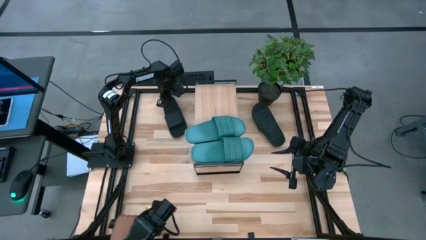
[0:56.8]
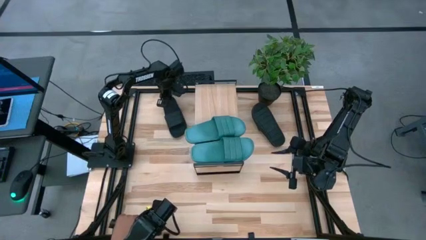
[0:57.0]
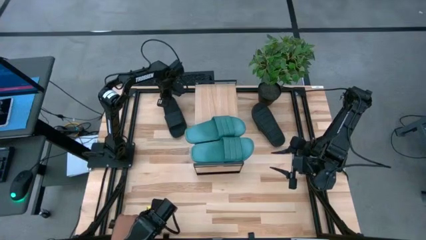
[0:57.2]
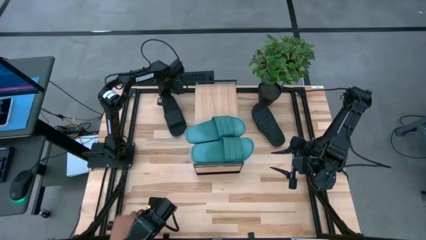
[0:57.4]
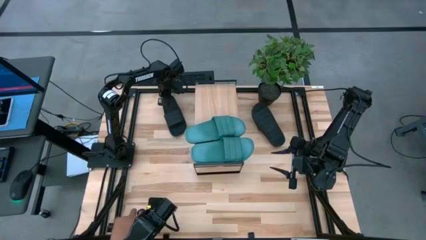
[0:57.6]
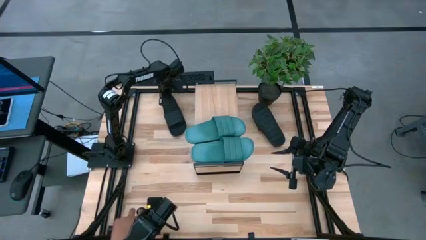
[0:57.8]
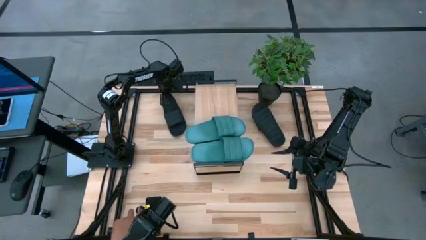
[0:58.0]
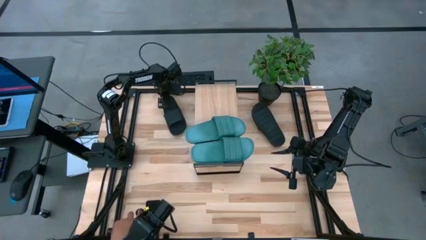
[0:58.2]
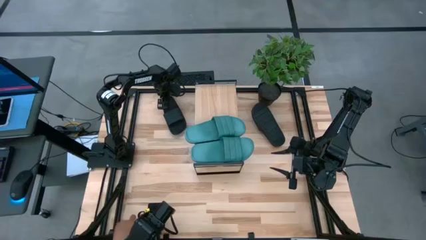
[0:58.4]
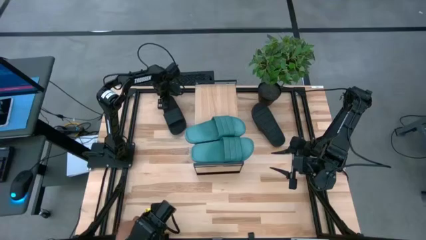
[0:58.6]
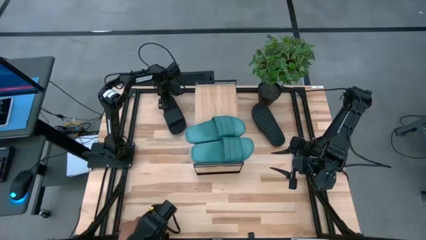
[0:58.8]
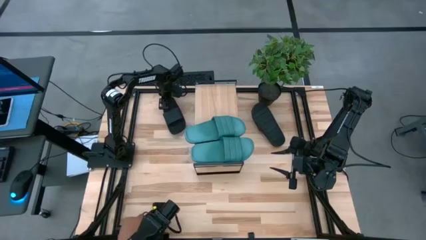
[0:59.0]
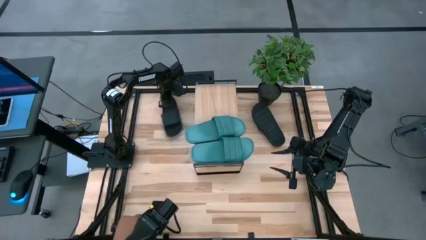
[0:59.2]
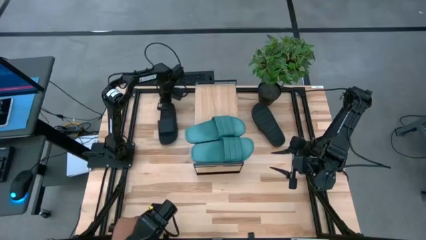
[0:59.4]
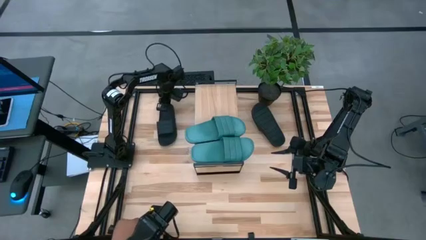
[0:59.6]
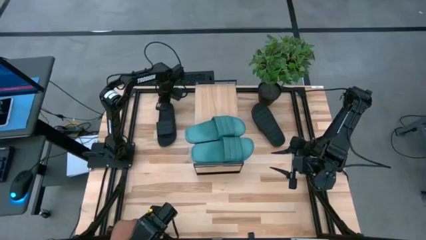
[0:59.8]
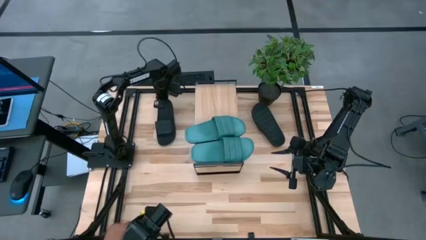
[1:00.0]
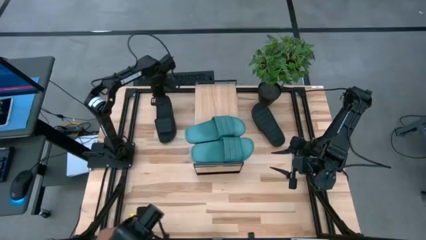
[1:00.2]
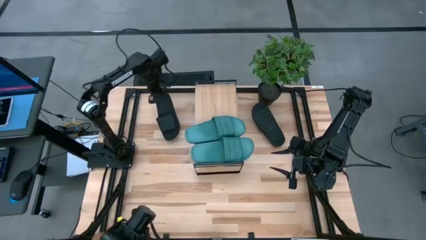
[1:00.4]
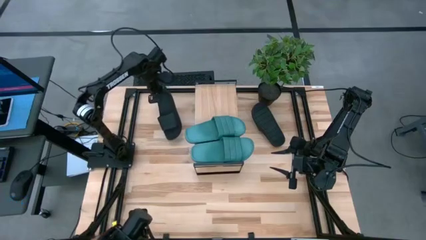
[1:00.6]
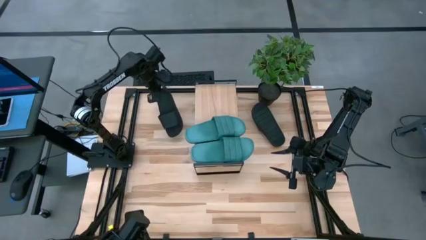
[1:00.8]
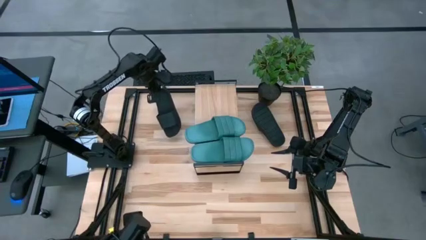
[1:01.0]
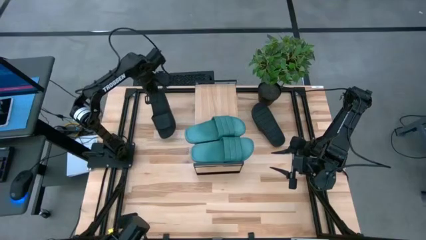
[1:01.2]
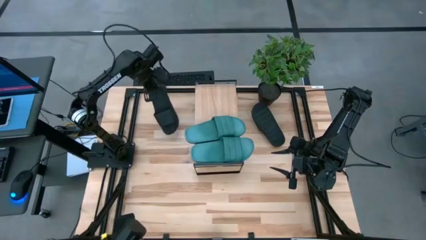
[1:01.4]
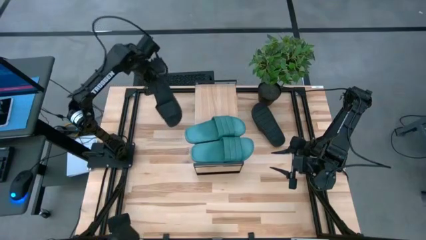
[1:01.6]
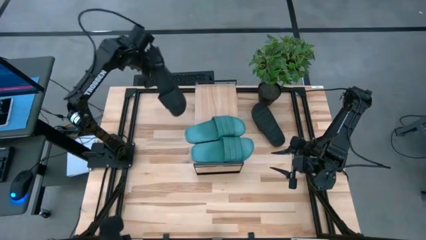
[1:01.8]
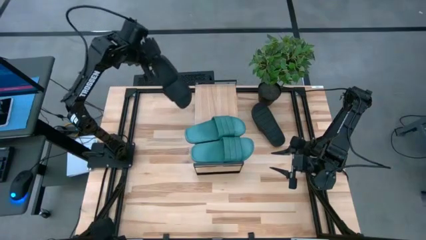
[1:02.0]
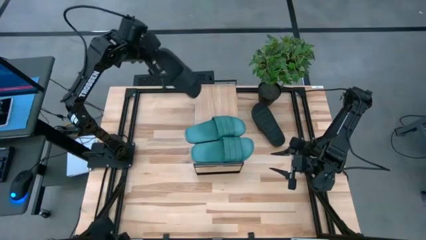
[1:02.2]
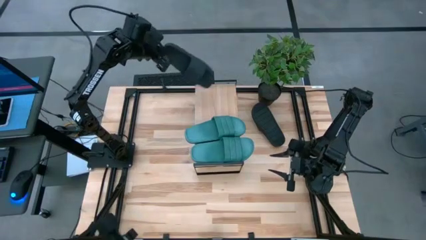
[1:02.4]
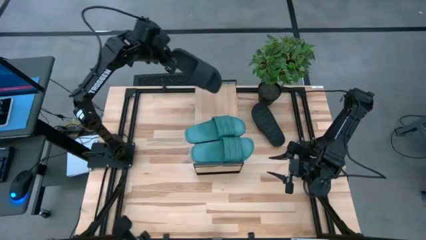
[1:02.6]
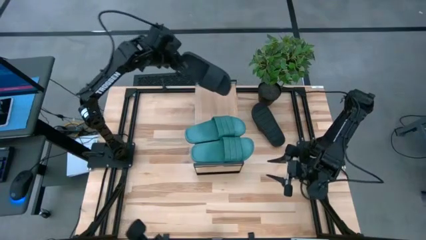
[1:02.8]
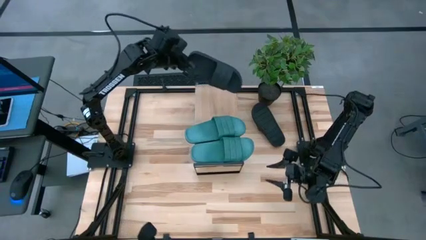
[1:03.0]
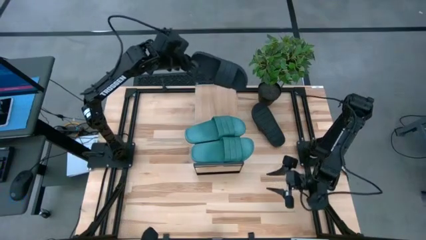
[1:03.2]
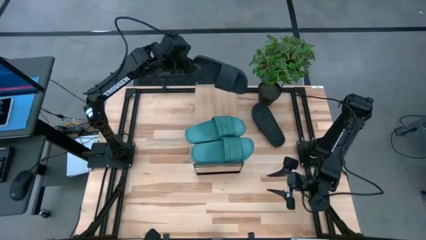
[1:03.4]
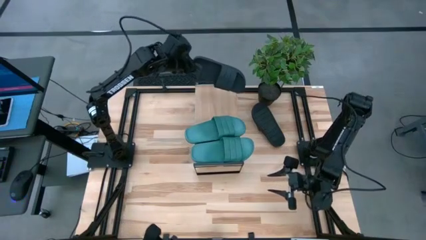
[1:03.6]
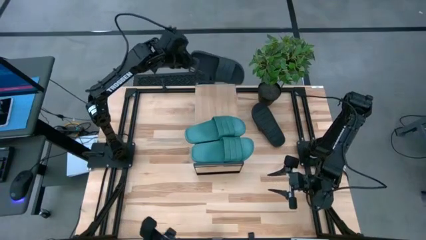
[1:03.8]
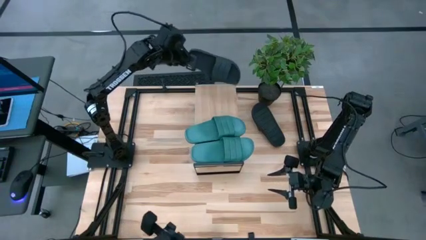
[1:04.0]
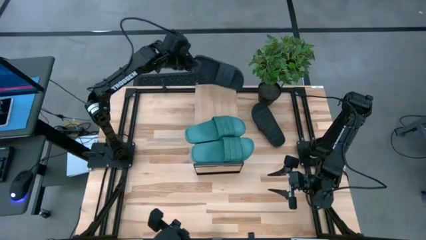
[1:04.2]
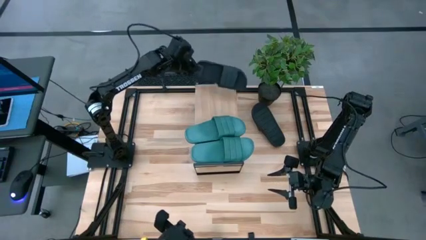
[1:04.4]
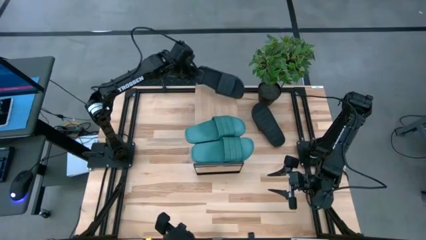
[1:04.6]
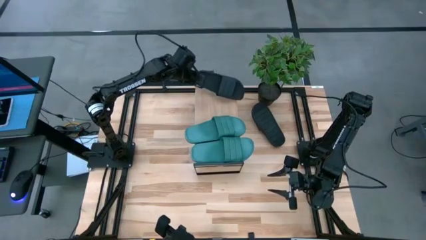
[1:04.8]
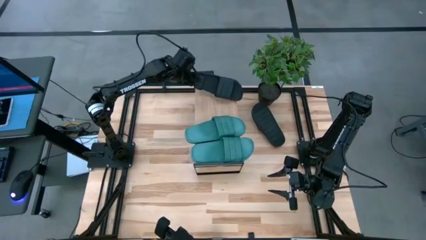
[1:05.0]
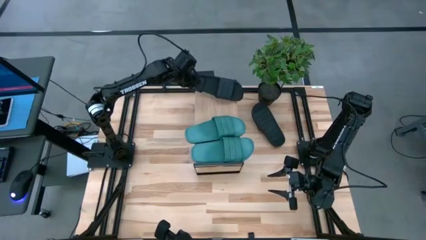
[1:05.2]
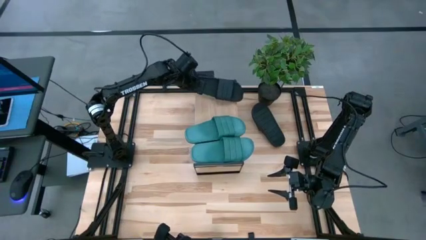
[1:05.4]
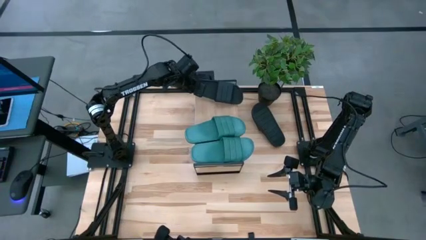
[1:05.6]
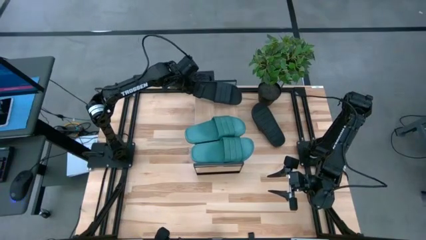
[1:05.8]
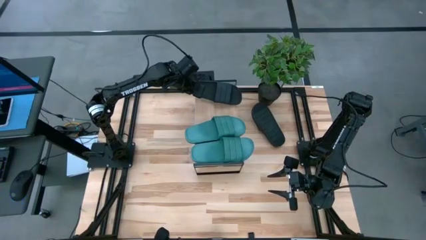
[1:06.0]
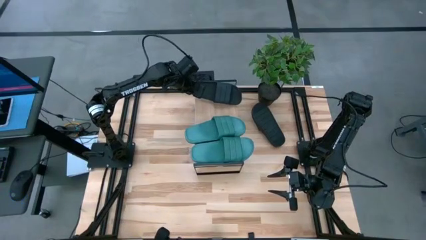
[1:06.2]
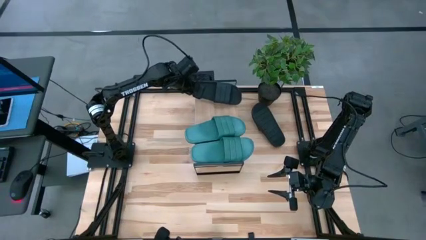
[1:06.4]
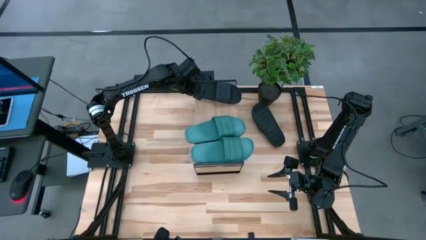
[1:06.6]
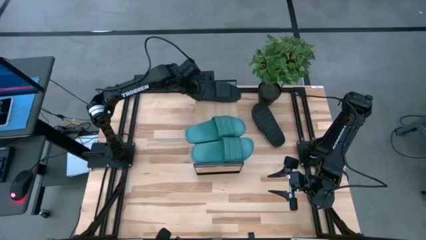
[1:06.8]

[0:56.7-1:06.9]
Task: Pick and place slides into the shelf
Put the left black slipper on the shelf
